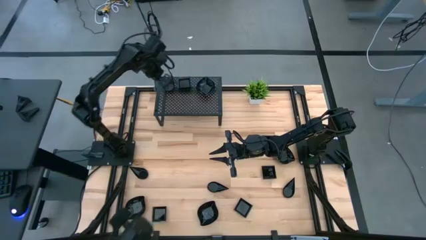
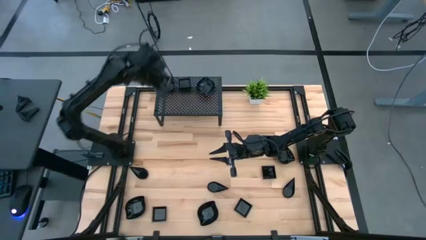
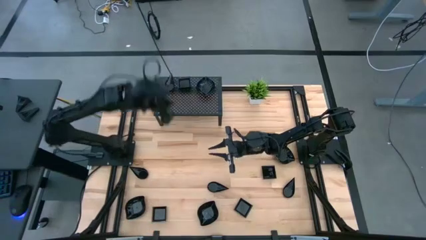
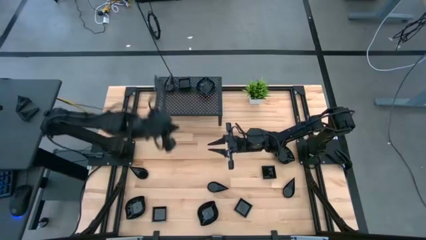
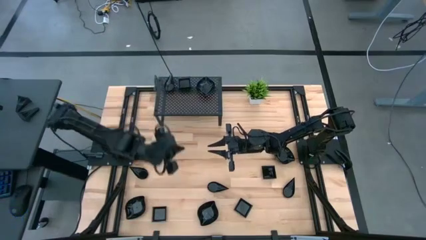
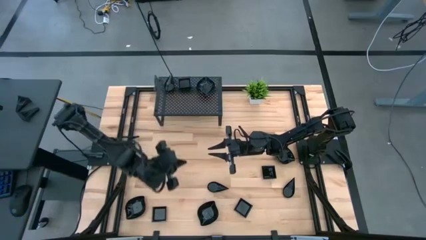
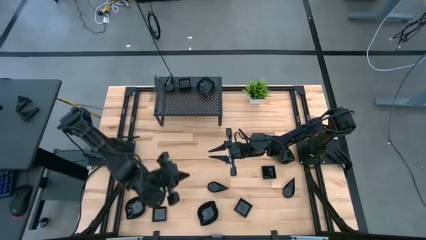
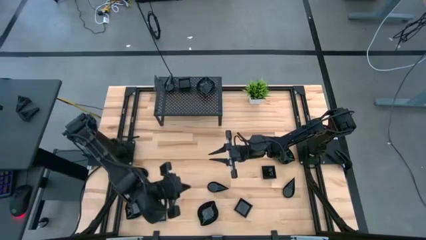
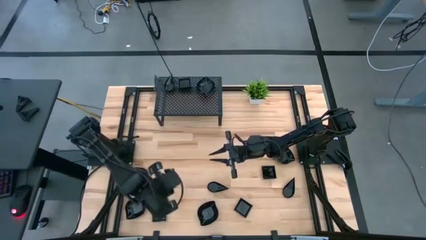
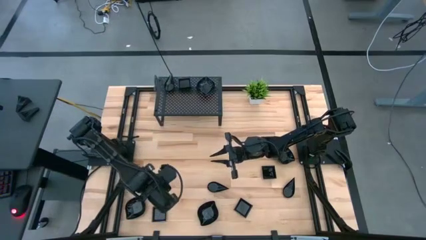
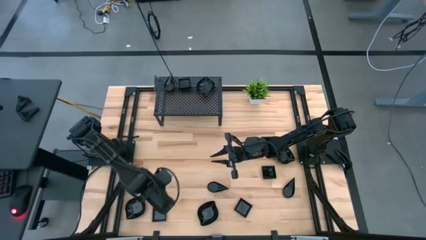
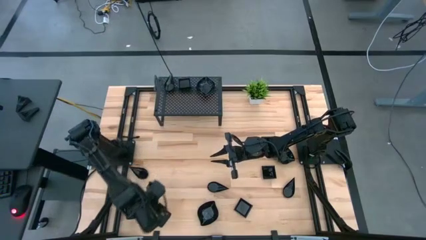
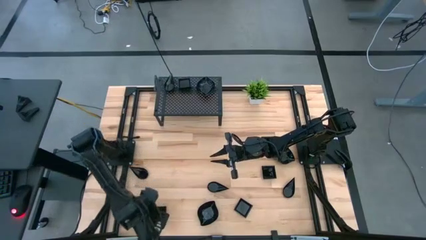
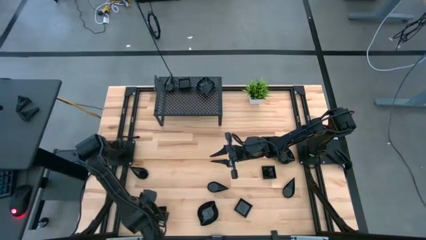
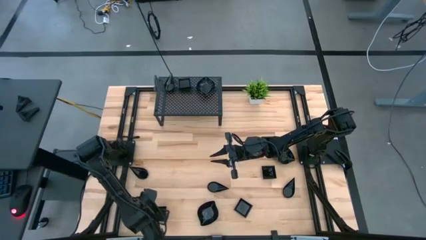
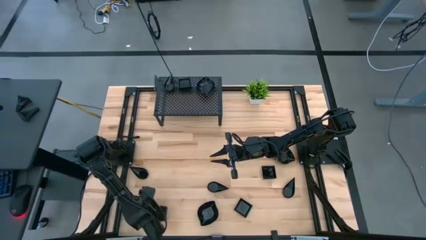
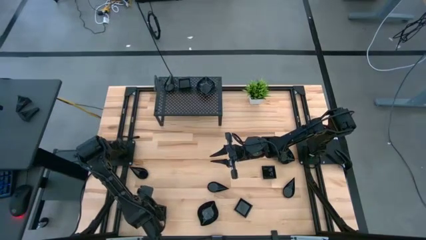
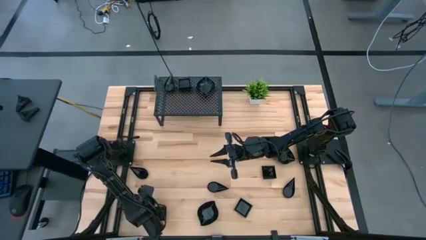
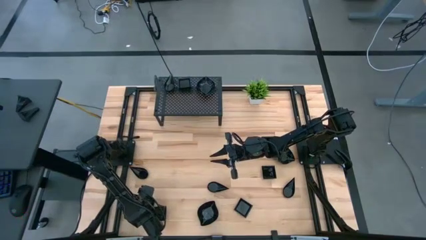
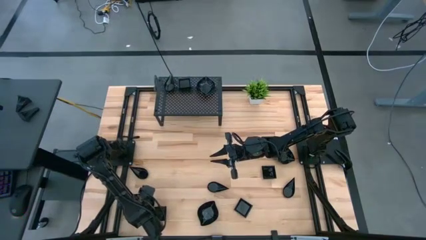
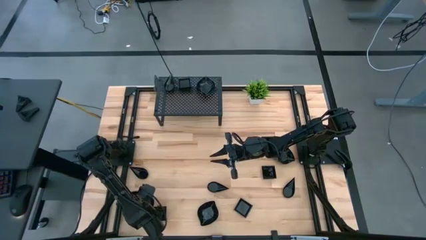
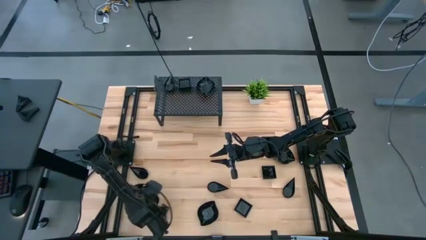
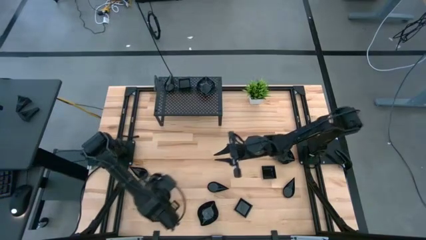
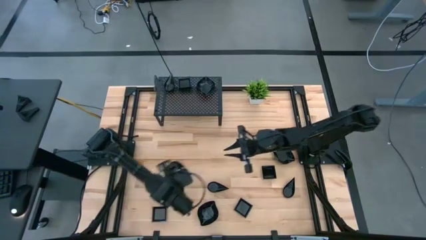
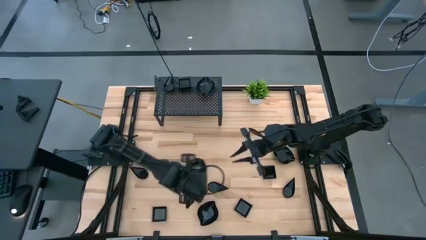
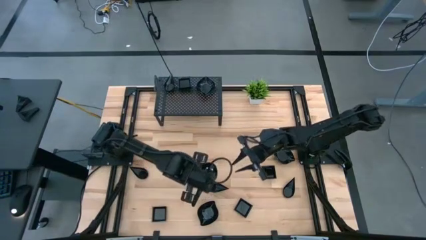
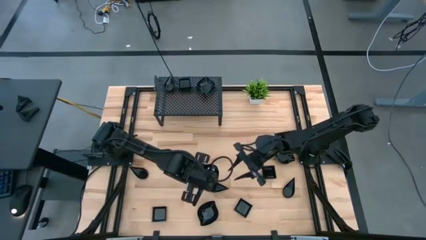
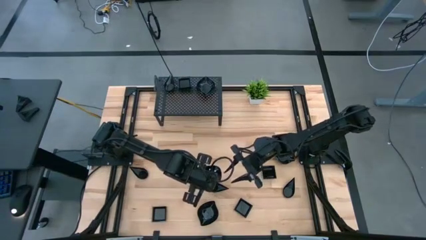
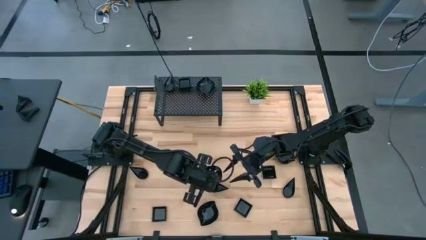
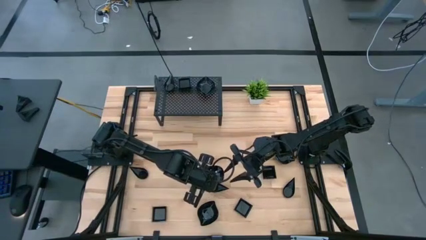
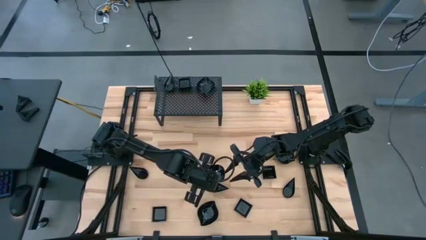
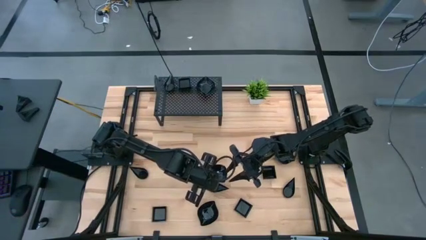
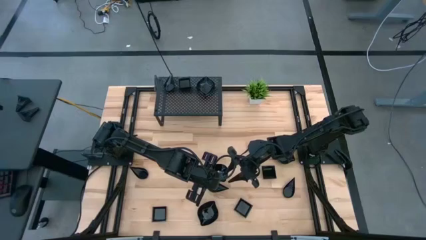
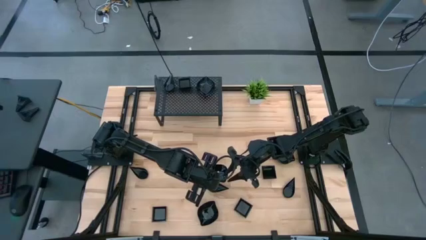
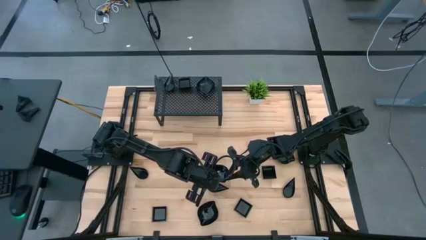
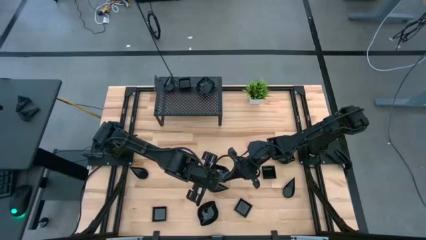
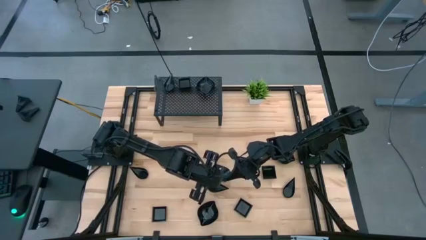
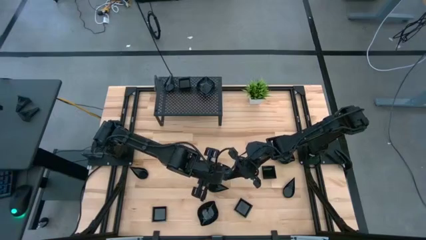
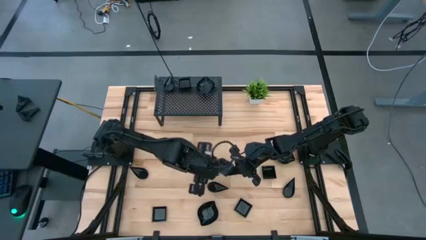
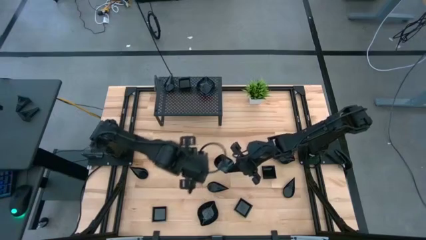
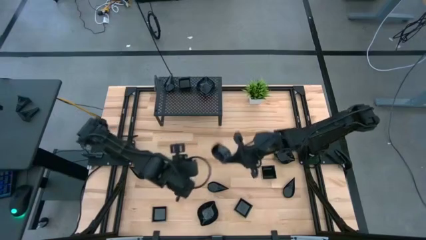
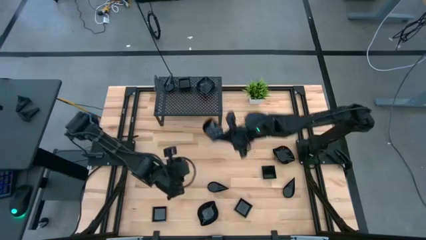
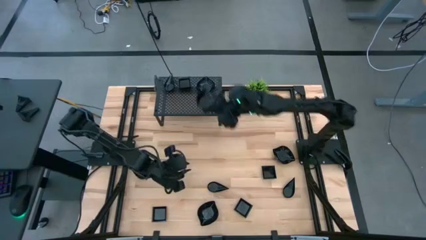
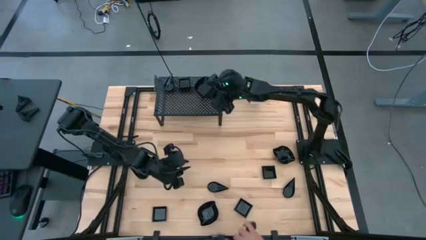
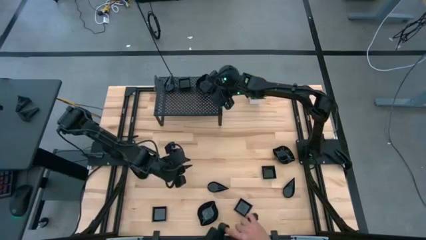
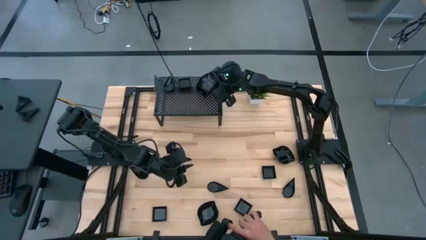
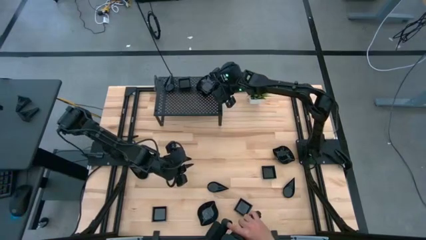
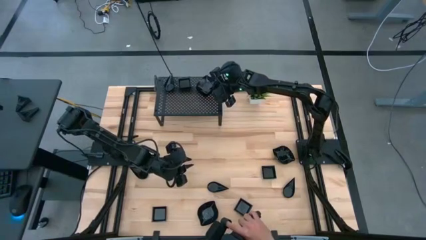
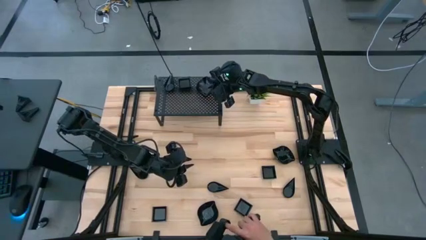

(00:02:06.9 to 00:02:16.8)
Task: Pick & Place Mini shaped plates
Stack the black leaf-shaped plate on top of the leaf-shaped plate on the shelf

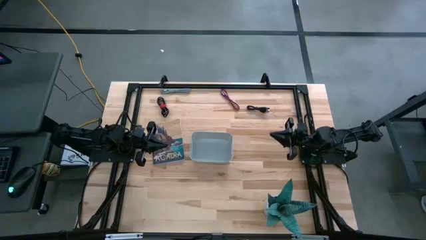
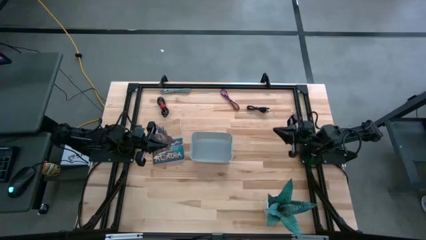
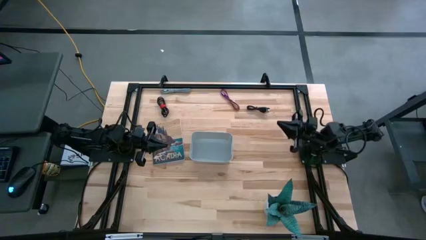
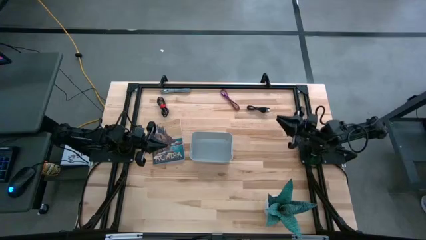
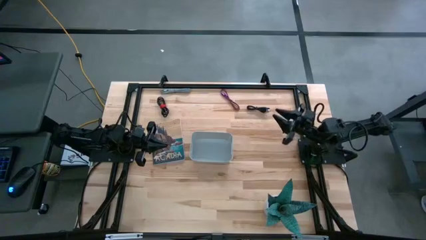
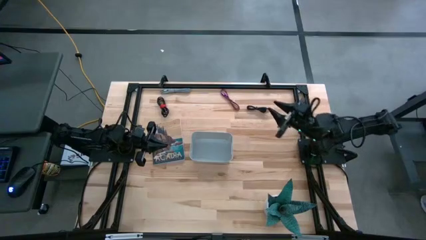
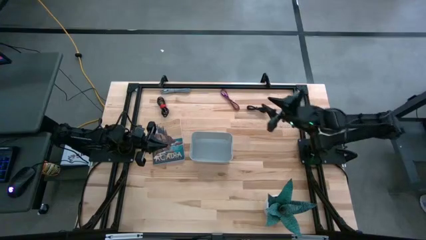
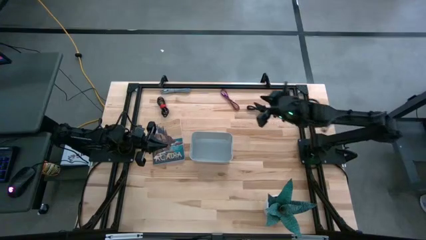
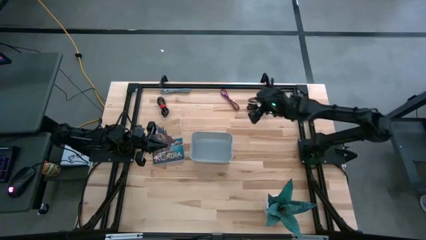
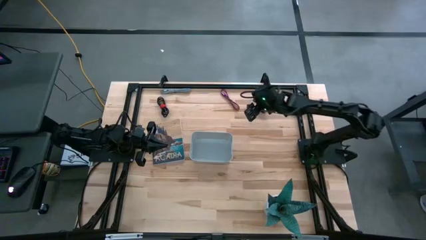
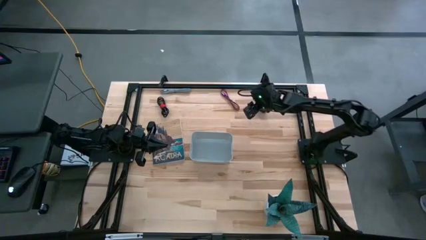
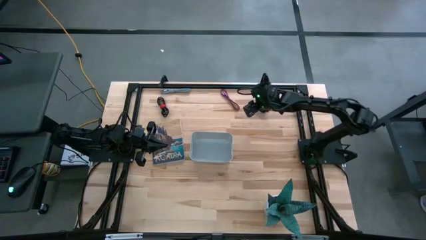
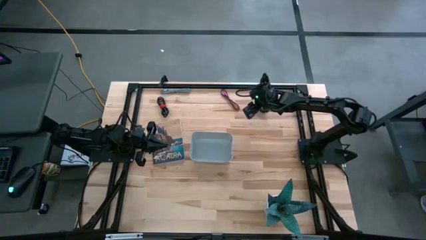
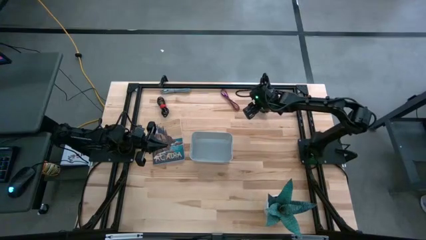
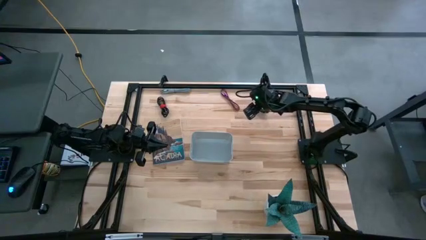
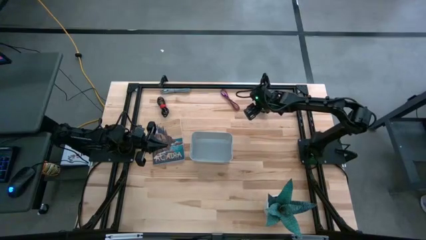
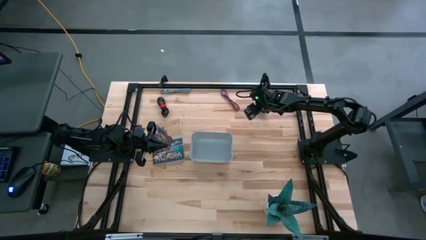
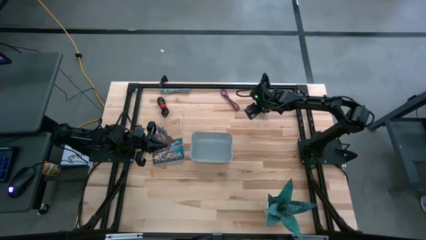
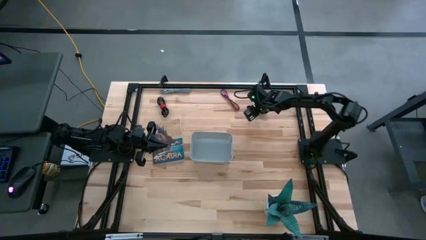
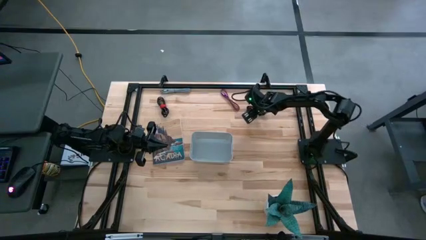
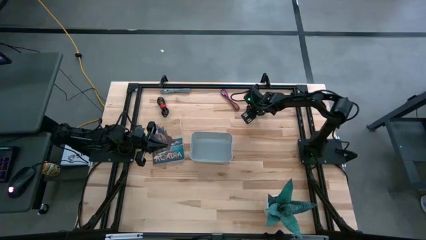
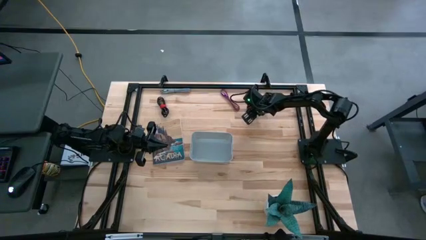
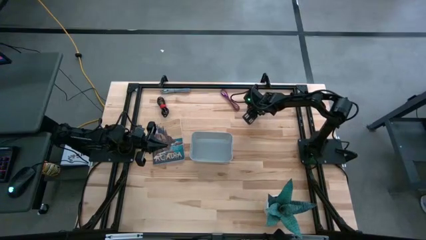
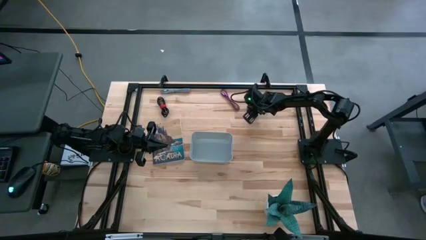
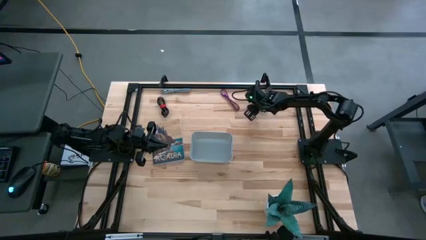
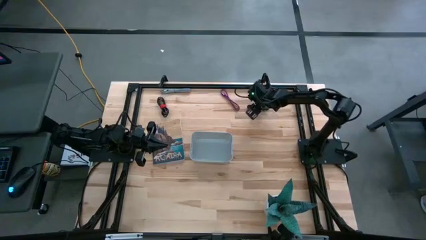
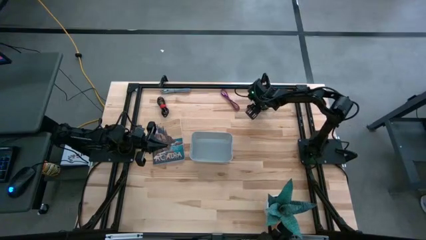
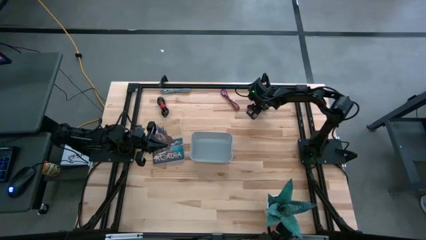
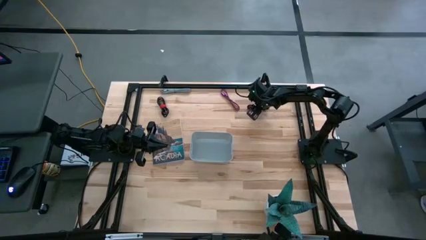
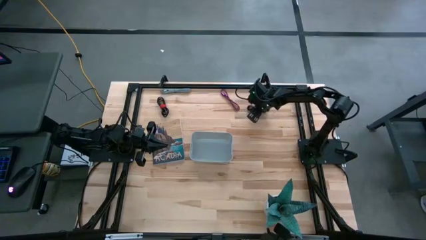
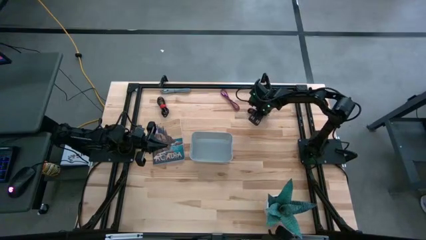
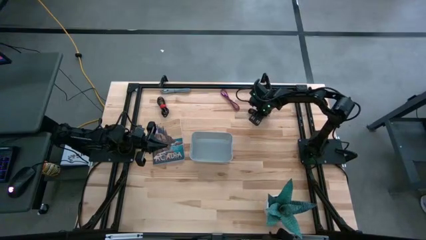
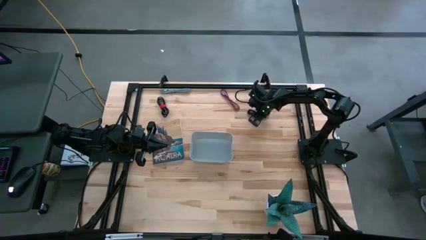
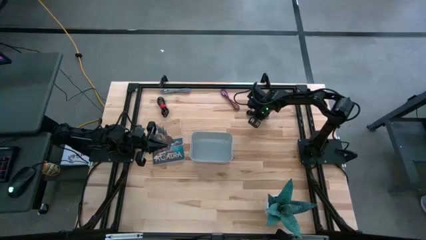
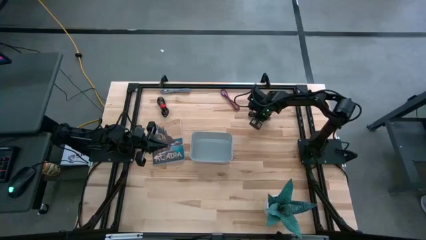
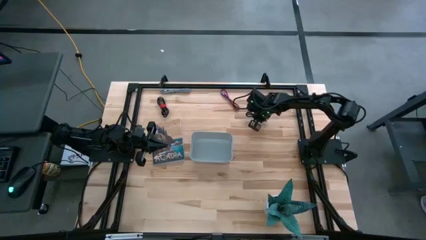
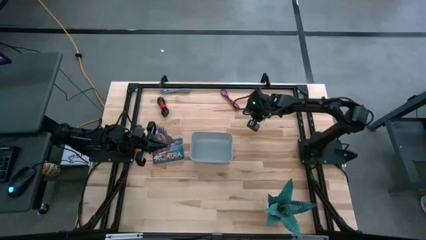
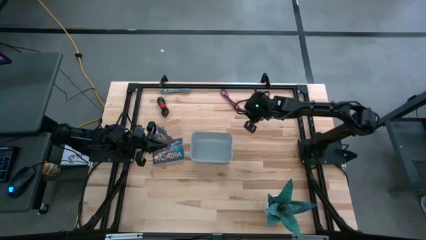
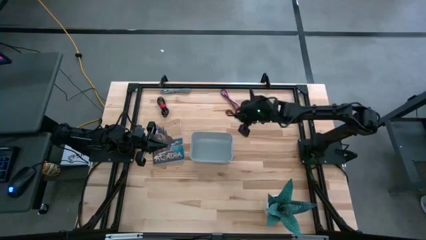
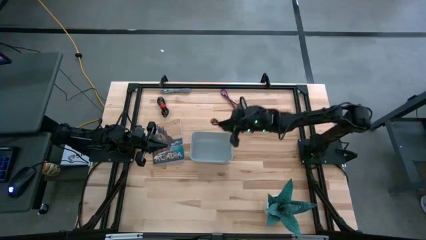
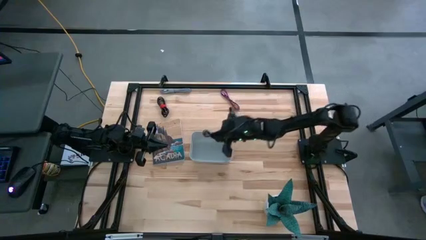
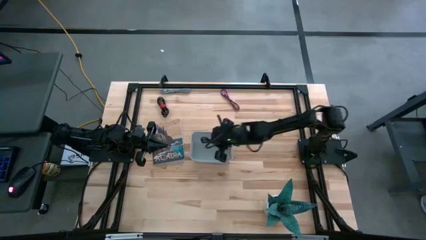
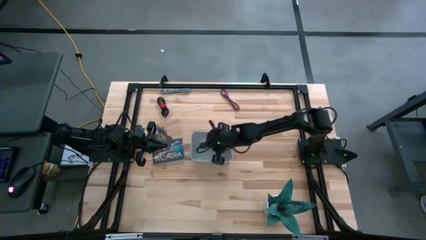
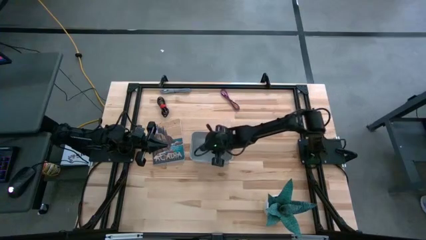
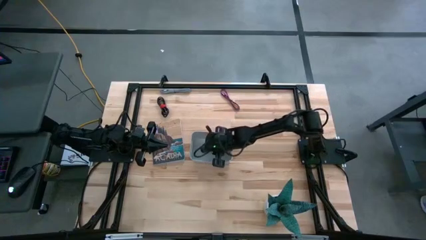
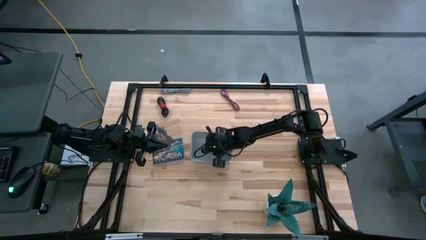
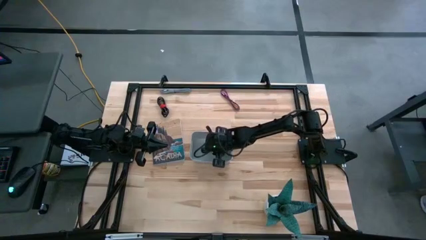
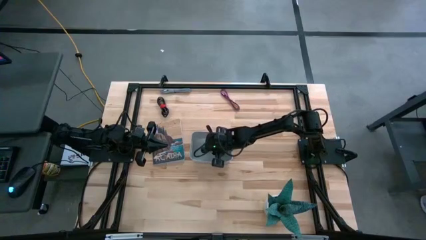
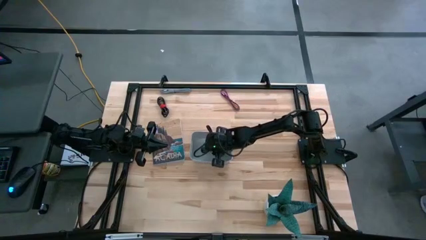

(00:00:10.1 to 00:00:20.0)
Task: Pick and place USB-C Cables
Put the right black charger cable into the gray bin
